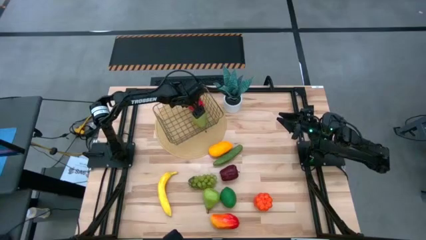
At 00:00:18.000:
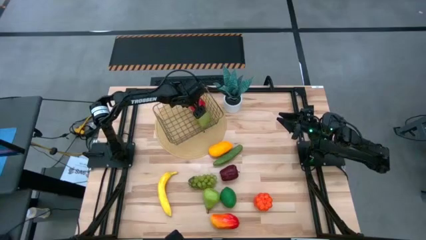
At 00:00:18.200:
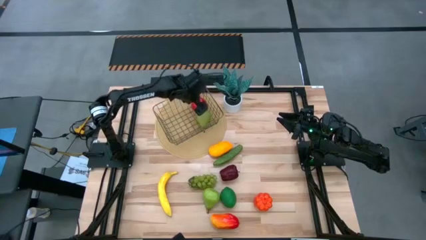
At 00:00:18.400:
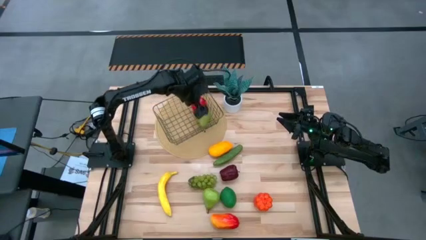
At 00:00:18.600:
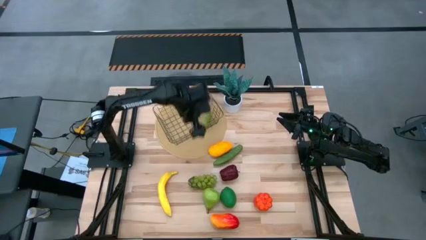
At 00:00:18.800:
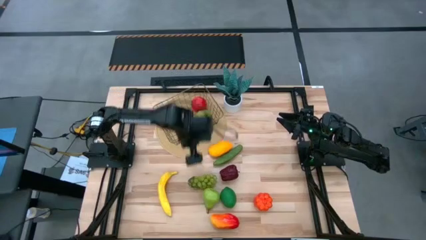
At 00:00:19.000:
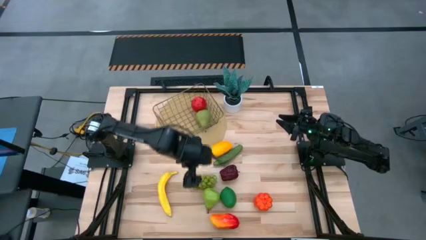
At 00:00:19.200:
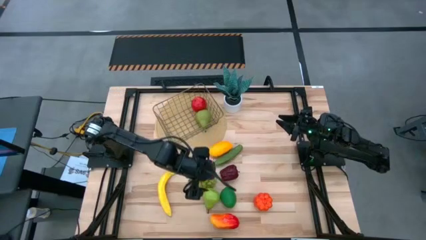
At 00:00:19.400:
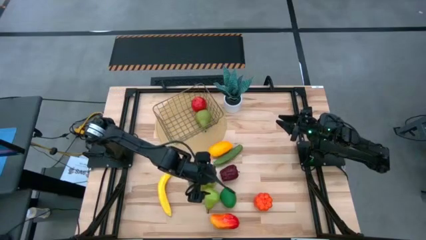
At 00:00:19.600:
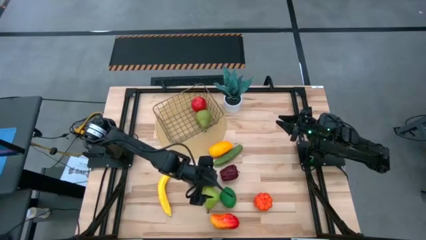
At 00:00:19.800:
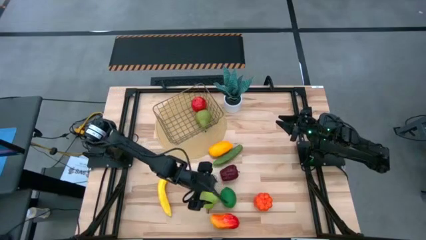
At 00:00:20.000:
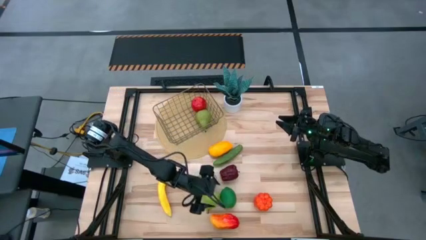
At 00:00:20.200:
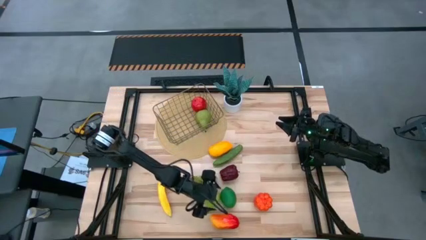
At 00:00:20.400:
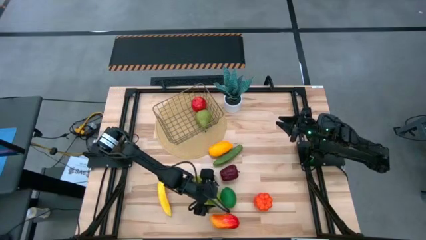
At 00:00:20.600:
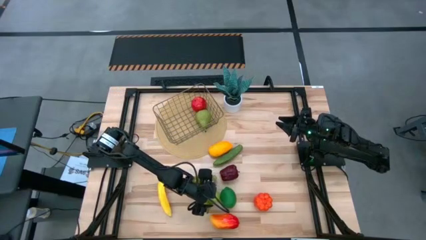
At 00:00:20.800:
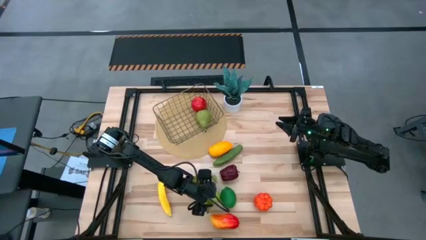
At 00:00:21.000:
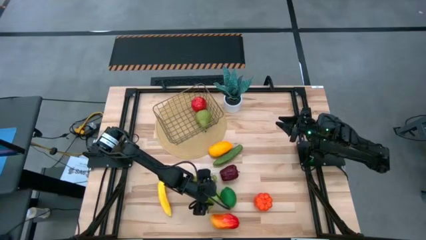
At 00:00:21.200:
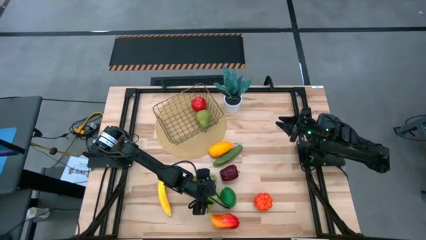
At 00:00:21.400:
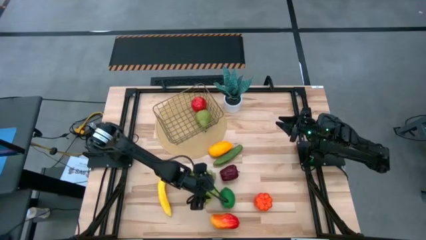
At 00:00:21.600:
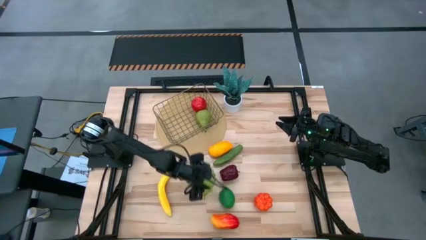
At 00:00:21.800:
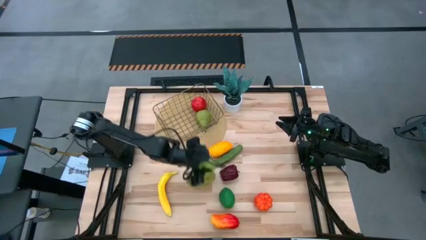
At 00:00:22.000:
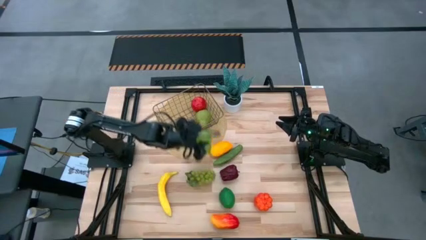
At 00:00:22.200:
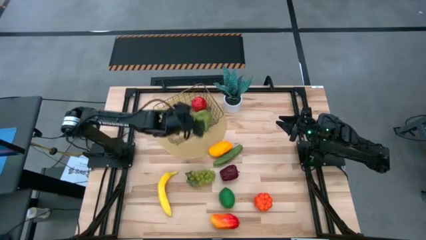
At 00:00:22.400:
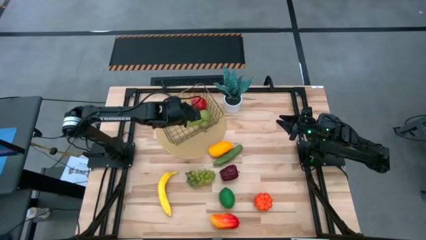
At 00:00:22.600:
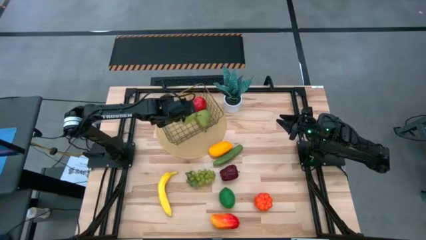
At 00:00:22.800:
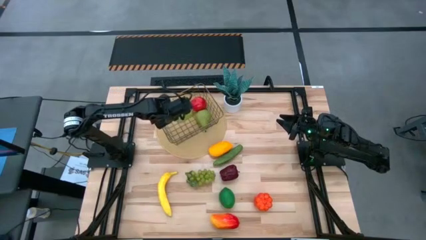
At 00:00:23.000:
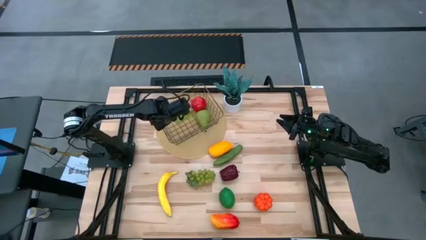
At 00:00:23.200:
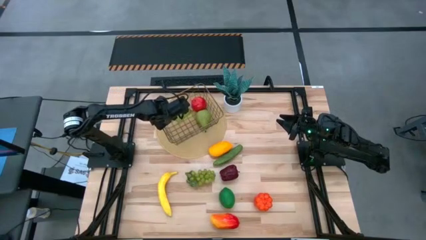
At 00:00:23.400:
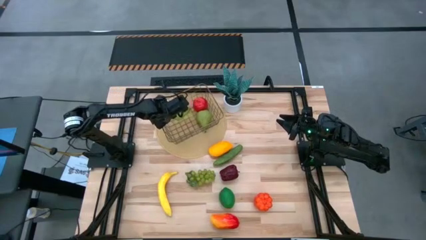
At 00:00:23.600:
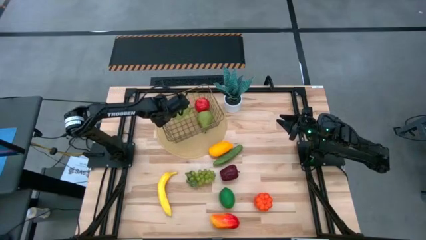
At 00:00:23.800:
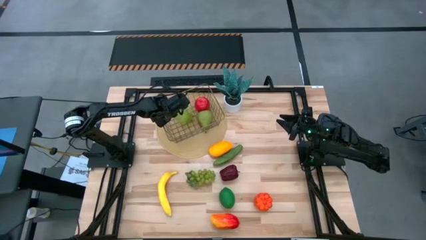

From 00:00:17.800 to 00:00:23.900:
Task: Build produce basket
Put the pear into the wire basket

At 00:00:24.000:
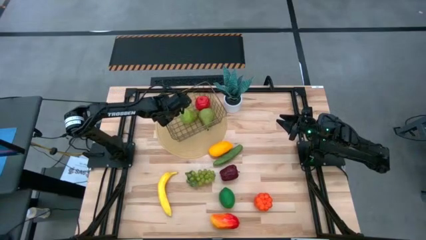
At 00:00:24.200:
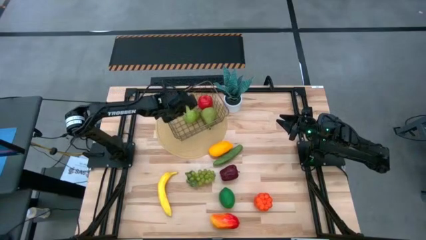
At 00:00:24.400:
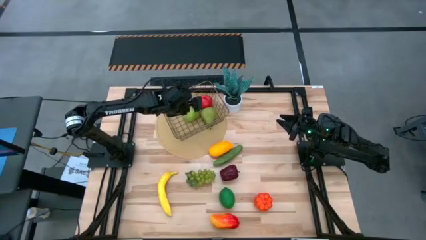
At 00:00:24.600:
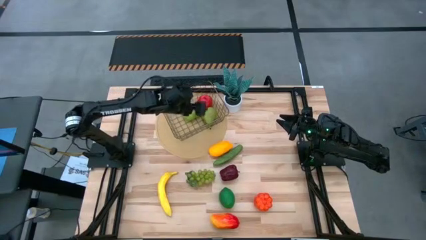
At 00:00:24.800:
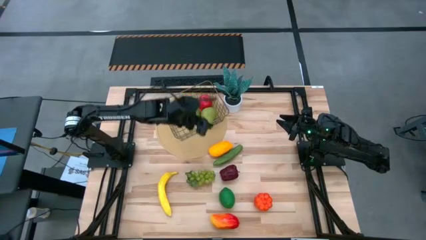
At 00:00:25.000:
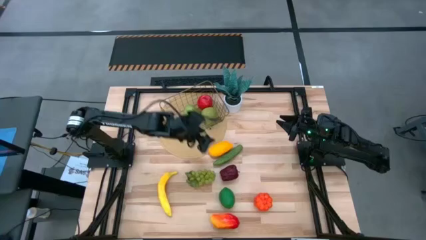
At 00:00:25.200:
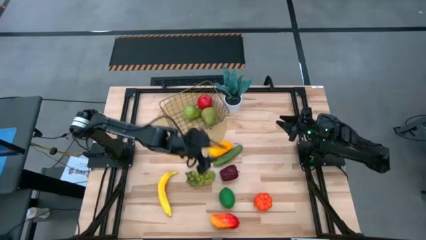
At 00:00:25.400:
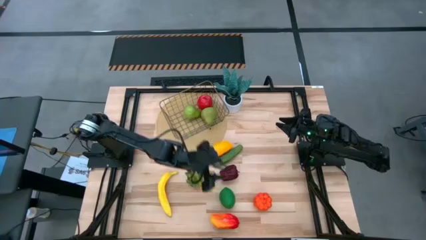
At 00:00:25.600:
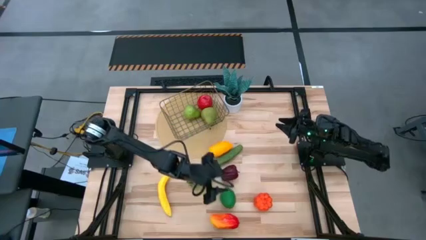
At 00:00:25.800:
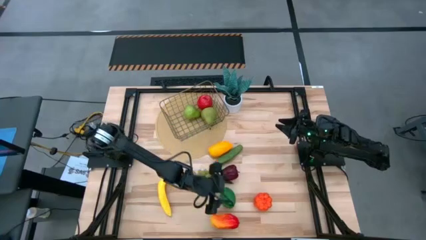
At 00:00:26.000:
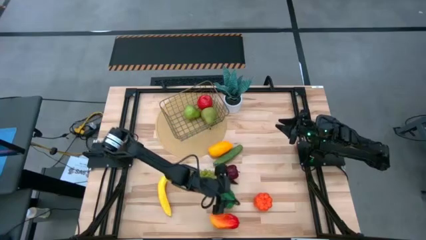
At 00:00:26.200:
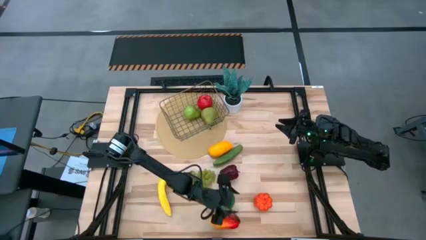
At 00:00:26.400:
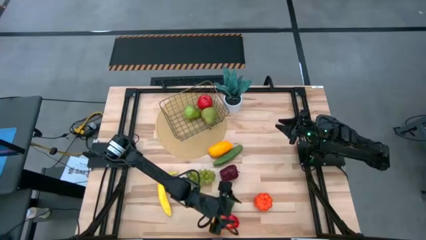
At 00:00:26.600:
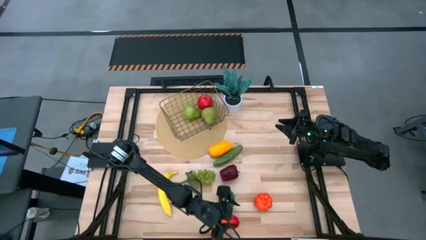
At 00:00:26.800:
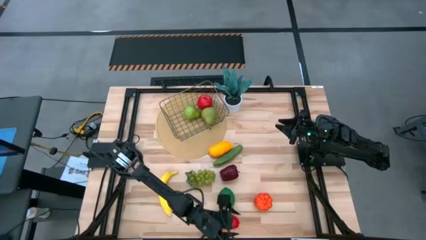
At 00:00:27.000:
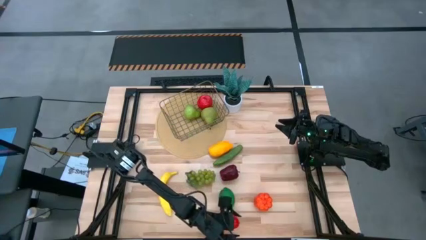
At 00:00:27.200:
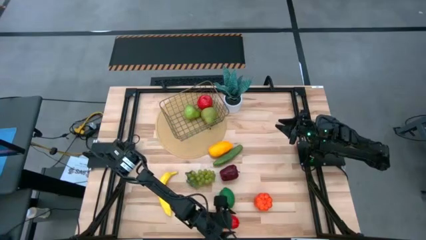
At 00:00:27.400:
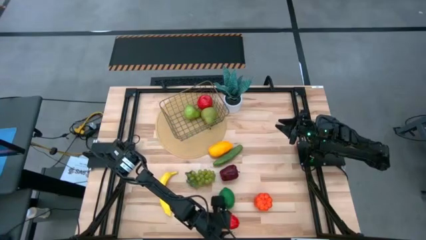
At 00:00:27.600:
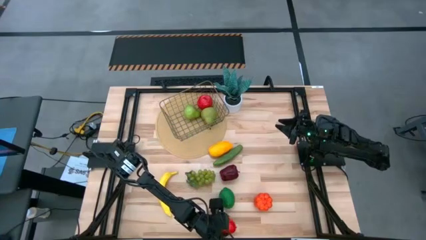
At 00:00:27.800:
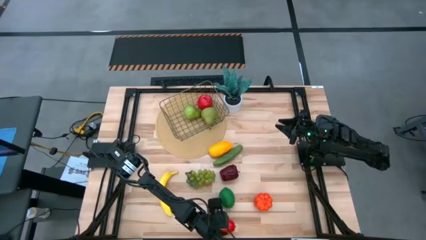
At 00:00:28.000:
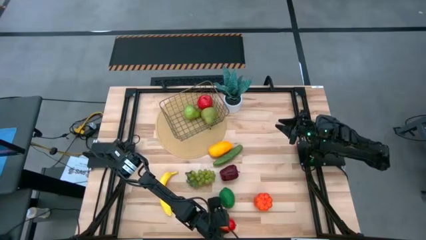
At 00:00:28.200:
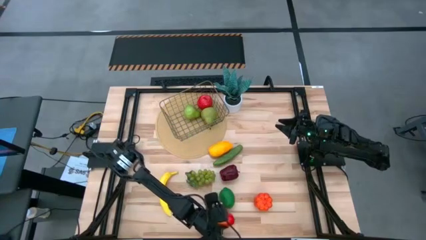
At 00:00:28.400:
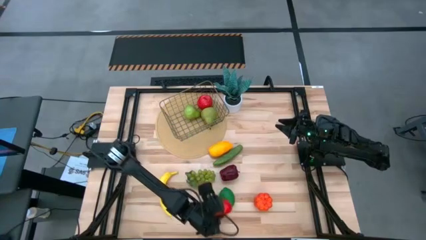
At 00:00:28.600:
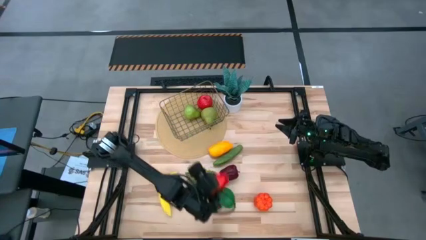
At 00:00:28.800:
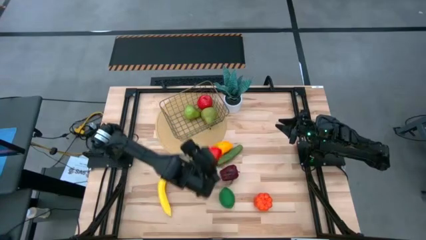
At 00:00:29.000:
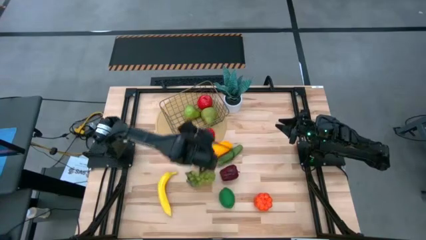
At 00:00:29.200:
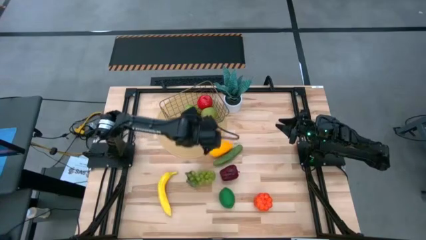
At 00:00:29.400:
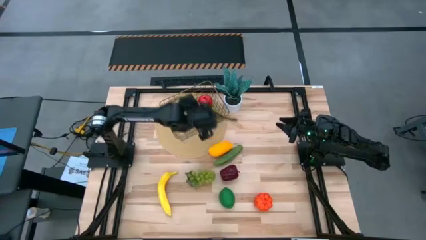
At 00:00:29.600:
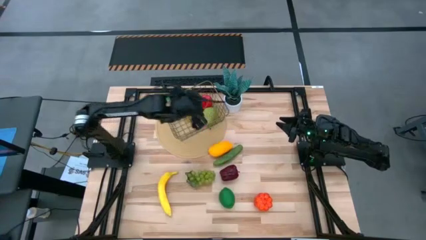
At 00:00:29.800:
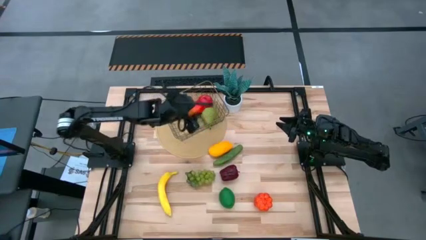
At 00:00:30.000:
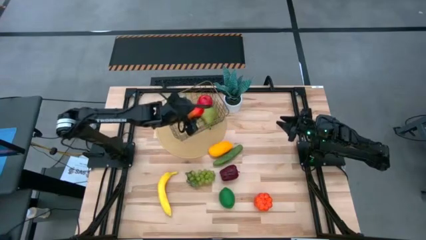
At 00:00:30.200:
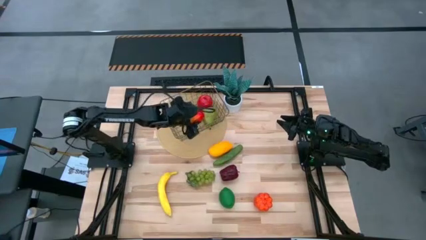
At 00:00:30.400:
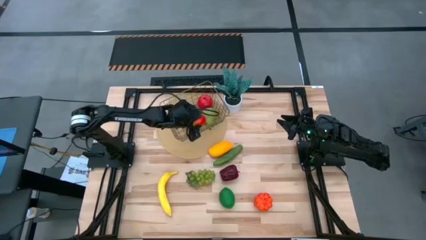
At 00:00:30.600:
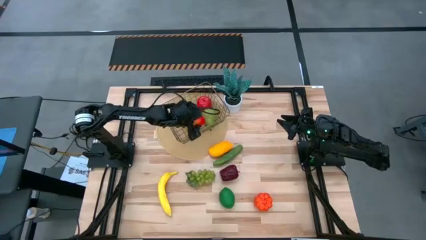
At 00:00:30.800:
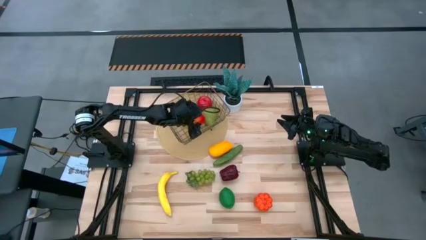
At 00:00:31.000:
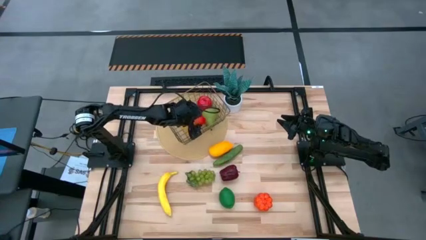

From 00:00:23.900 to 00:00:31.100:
Put the orange mango into the wire basket

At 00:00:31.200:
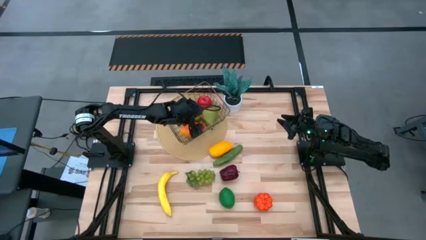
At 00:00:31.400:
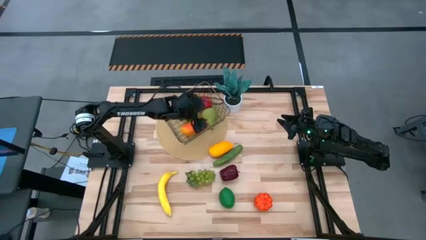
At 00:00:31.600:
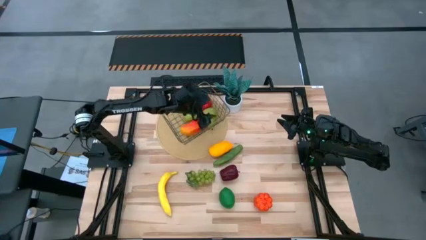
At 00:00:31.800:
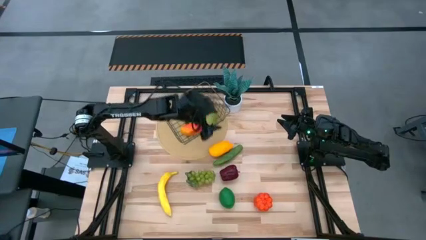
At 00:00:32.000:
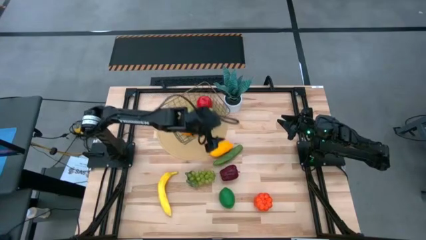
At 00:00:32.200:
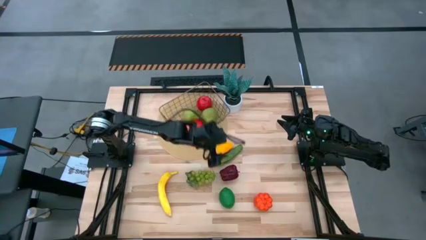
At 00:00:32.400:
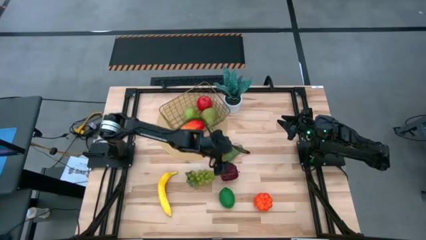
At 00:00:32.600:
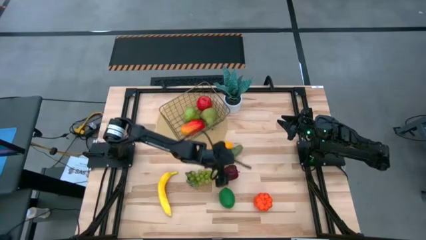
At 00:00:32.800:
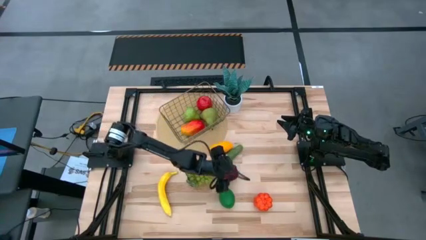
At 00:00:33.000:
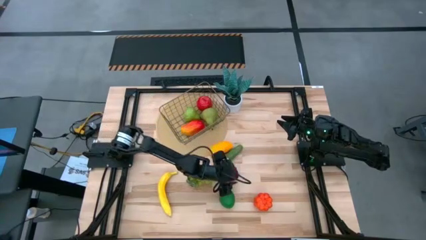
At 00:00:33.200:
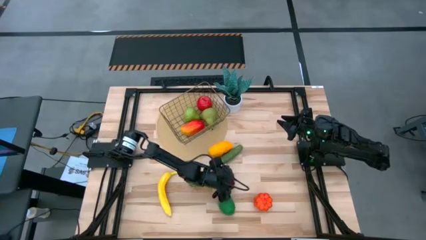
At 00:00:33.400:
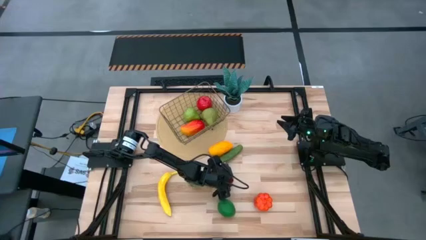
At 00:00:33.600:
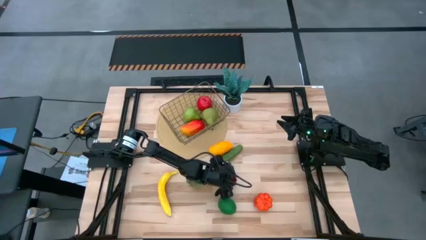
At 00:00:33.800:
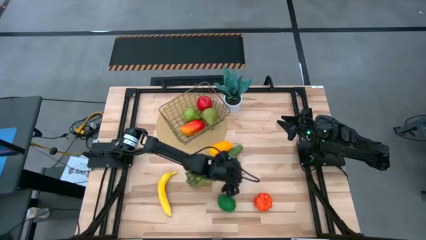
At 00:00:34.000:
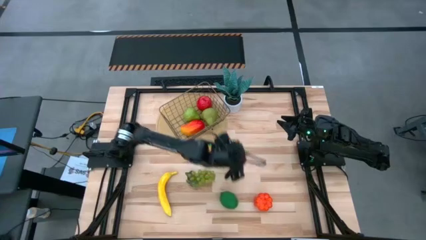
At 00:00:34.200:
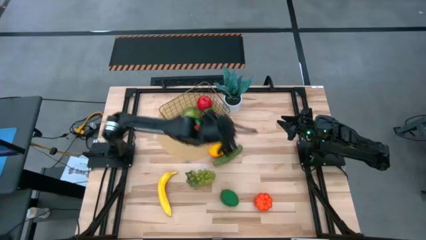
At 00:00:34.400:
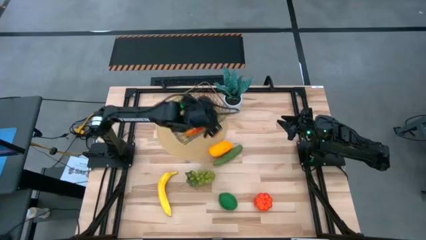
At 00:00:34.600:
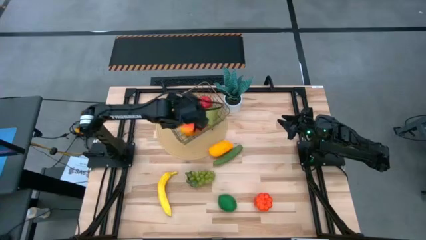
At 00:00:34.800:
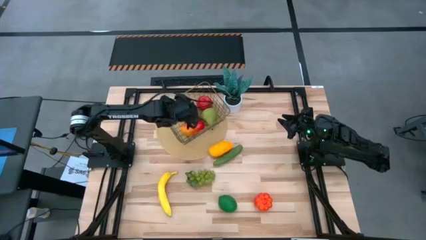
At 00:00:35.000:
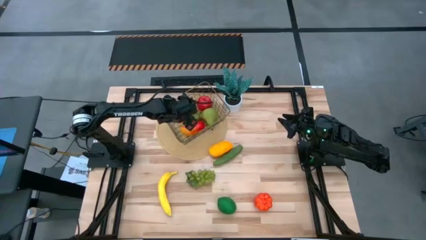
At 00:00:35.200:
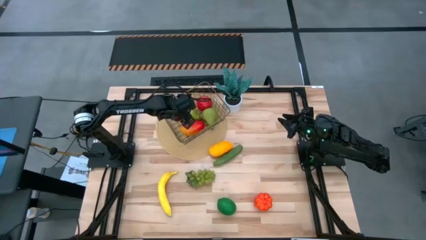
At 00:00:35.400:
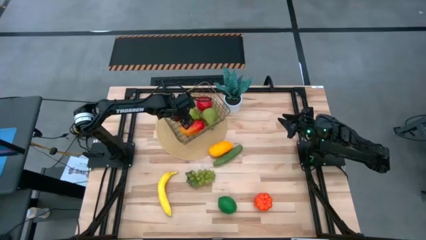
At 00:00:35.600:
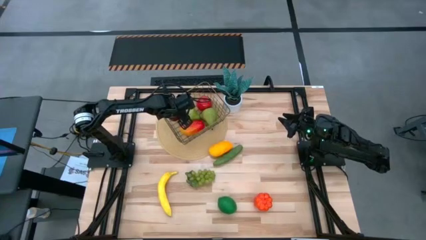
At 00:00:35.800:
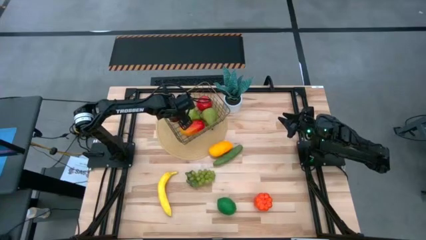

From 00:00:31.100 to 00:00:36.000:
Put the dark red apple into the wire basket
